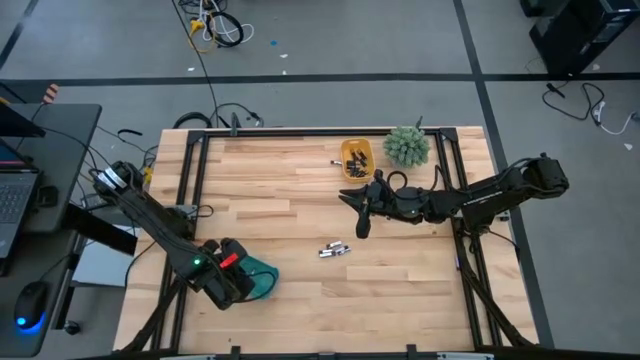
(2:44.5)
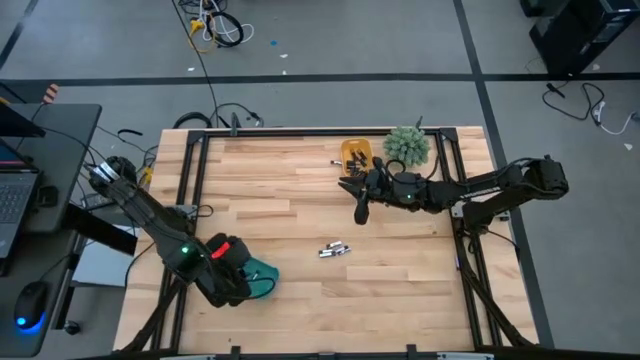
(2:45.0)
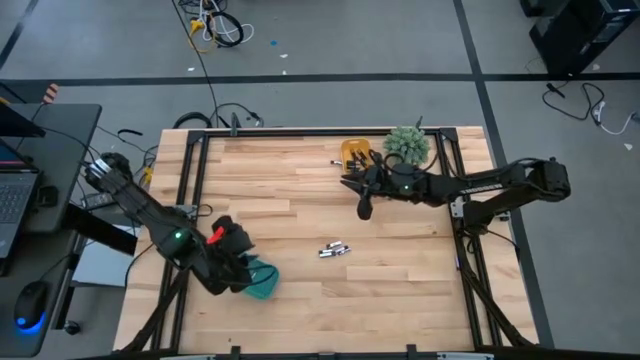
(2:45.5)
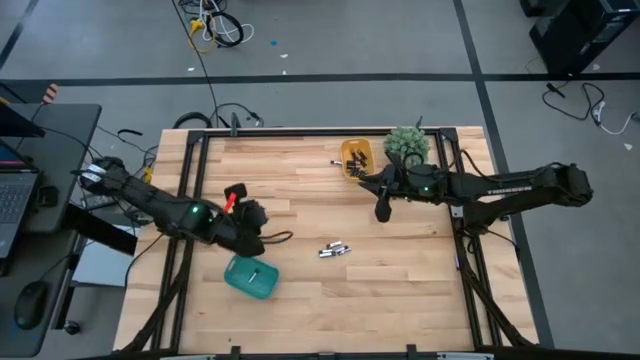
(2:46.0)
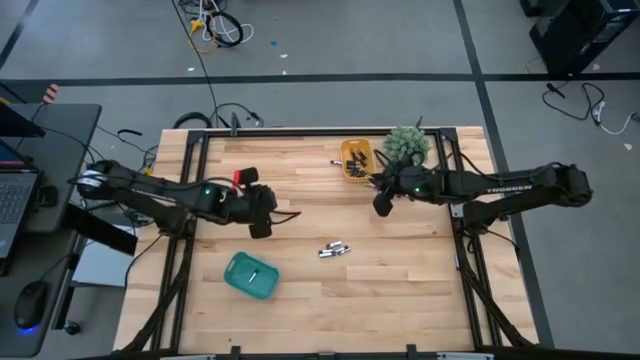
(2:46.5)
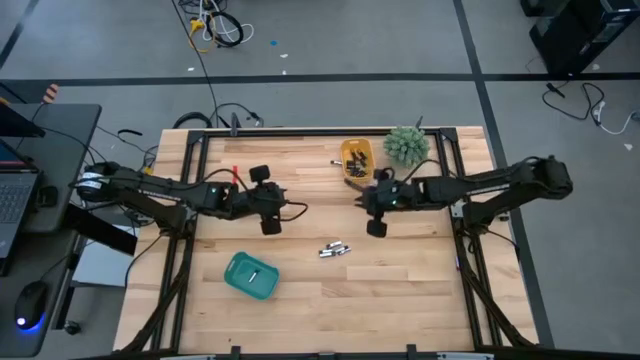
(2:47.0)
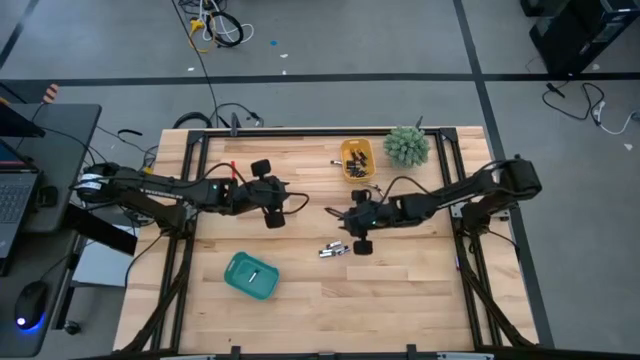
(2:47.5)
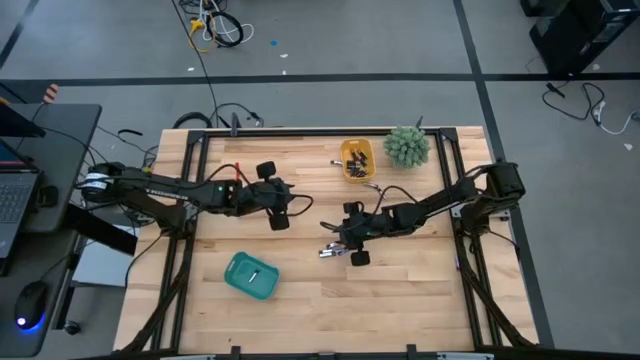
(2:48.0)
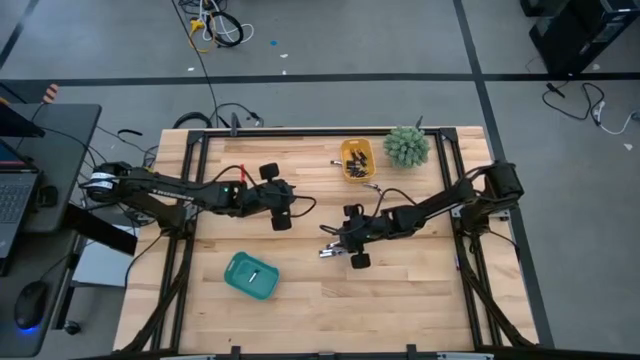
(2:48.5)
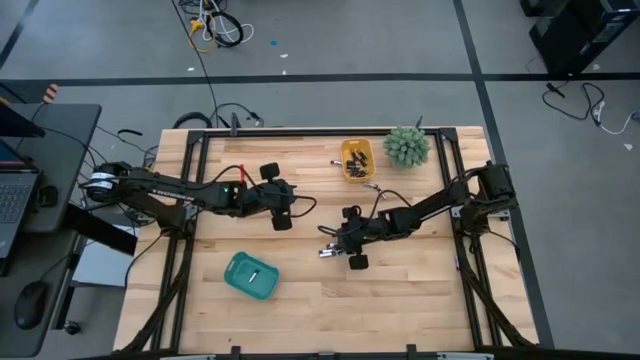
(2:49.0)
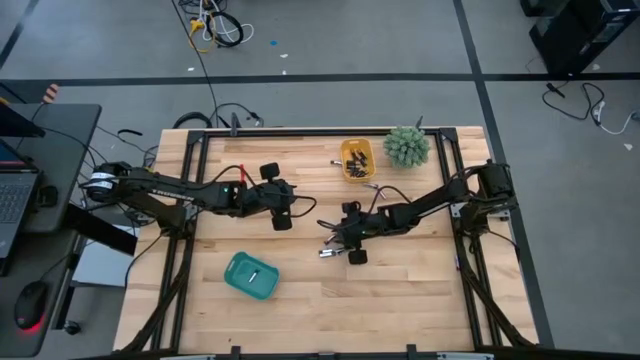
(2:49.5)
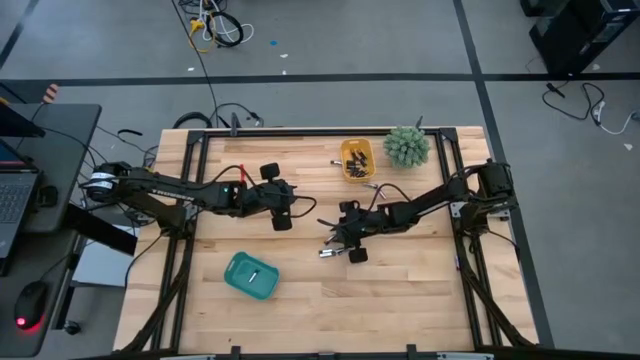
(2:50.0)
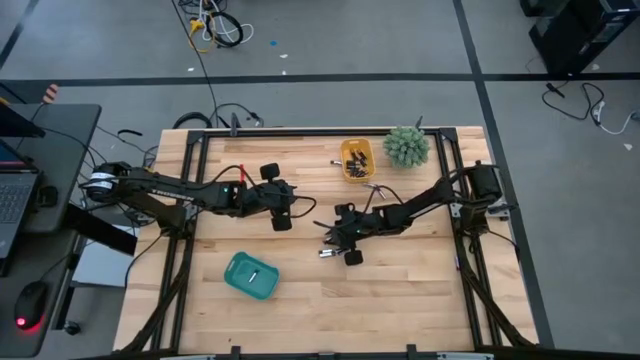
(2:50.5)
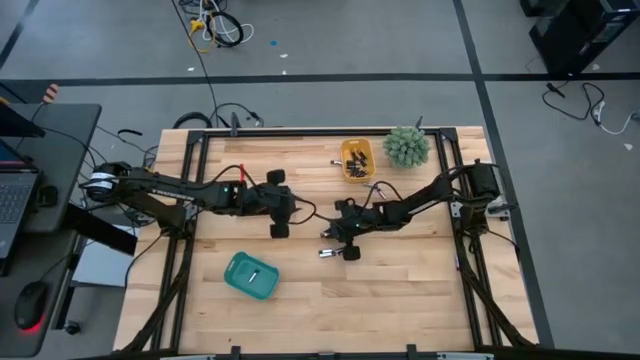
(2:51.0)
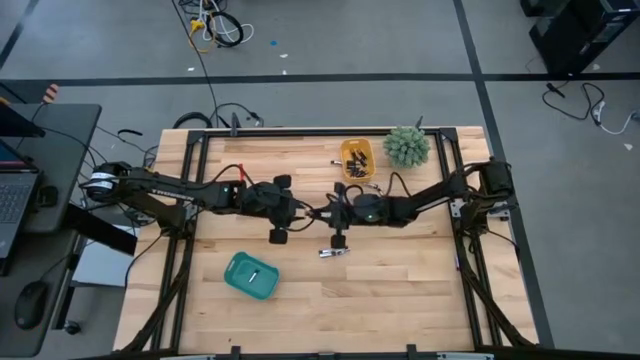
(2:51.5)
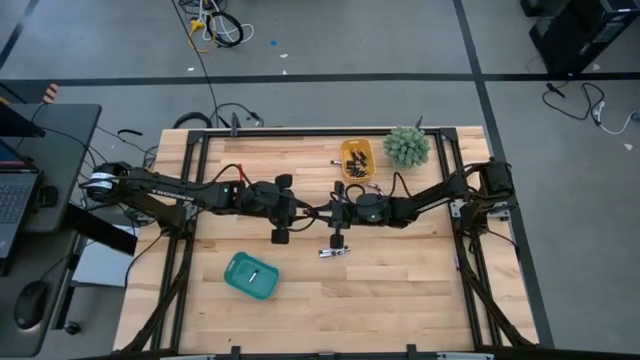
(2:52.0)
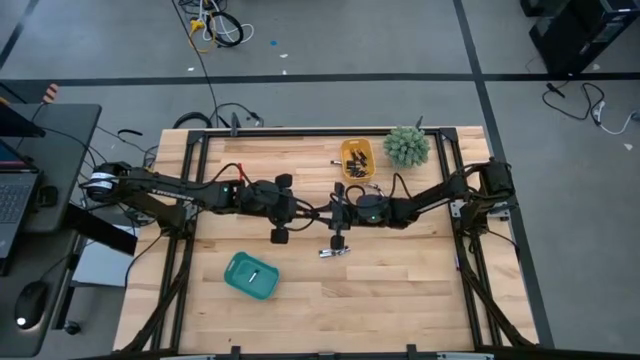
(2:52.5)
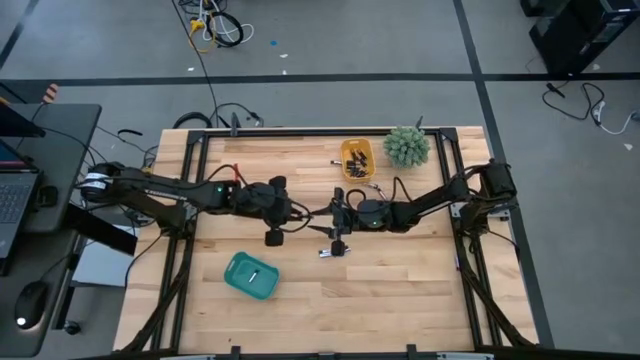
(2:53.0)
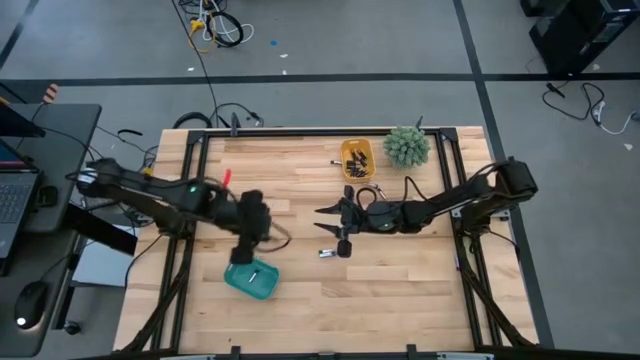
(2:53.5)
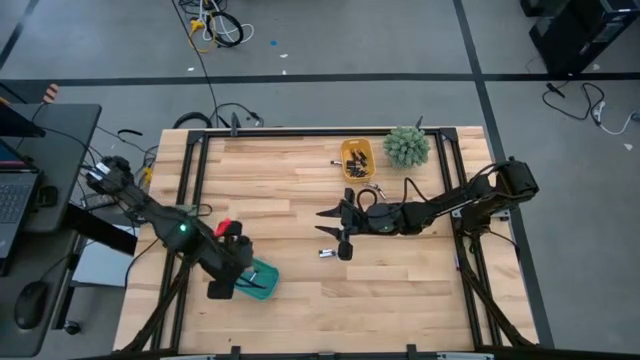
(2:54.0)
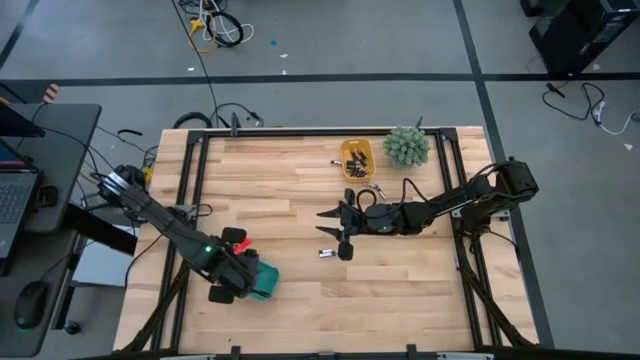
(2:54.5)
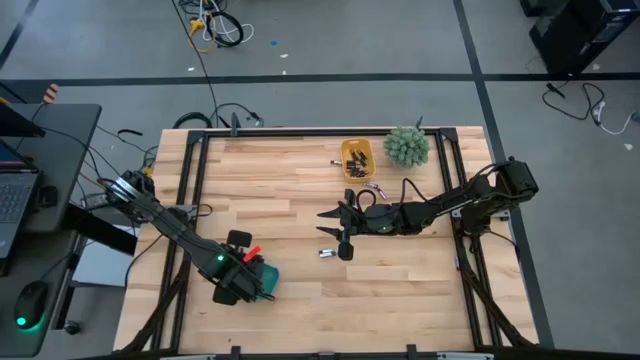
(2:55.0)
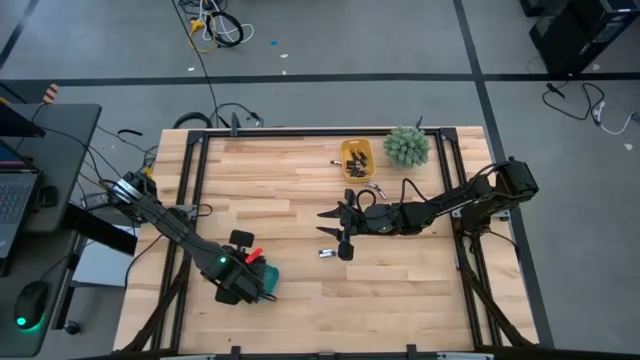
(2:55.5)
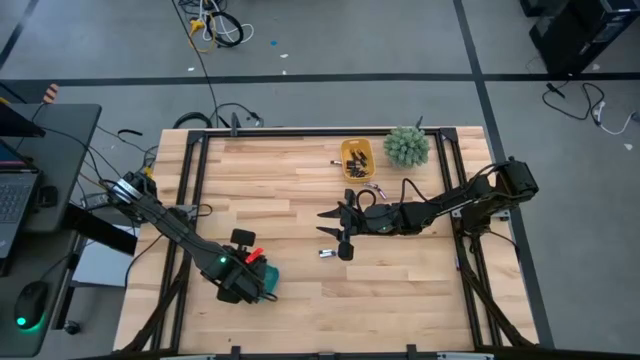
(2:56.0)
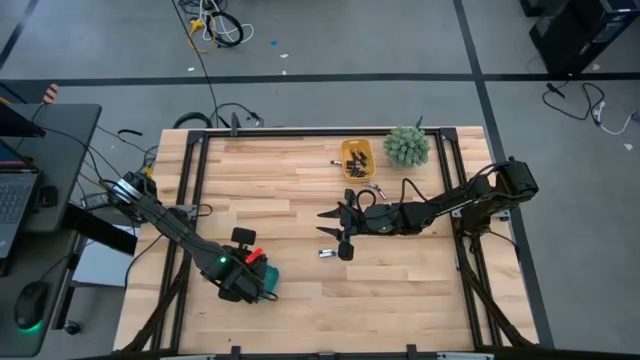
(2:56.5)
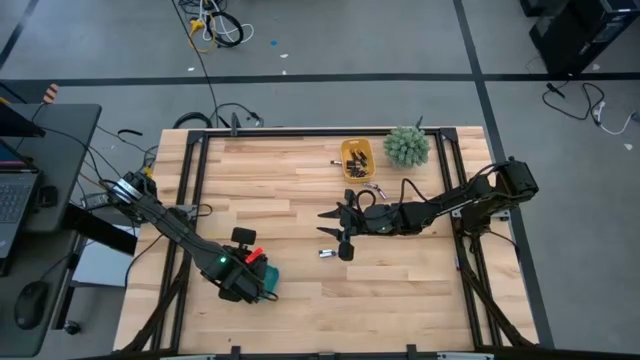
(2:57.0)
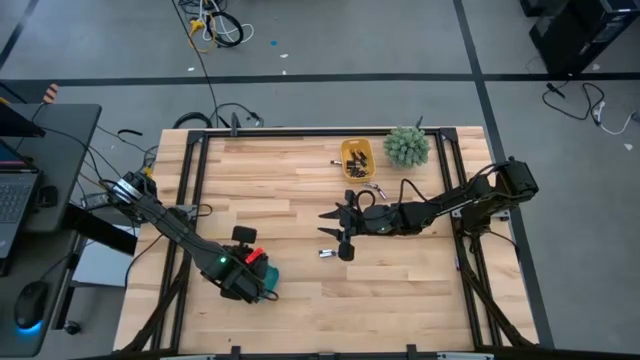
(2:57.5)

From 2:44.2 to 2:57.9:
Task: Sort batteries
Put the silver battery into the green bin

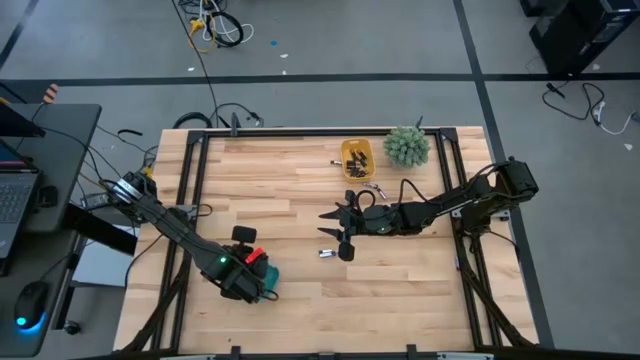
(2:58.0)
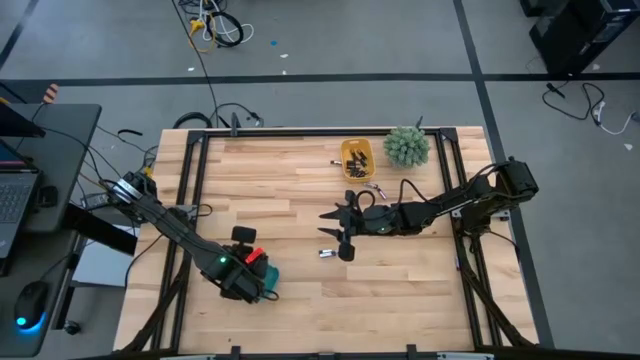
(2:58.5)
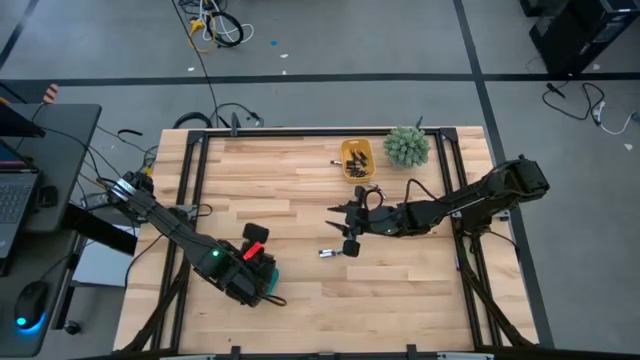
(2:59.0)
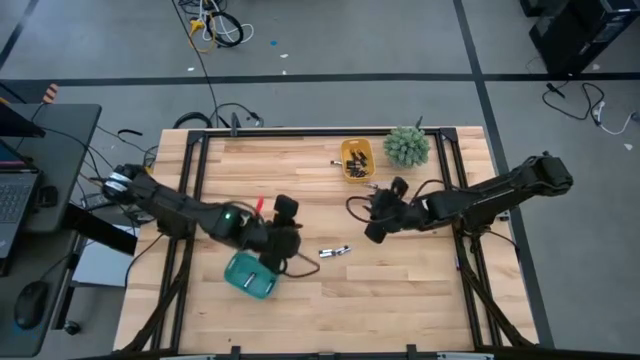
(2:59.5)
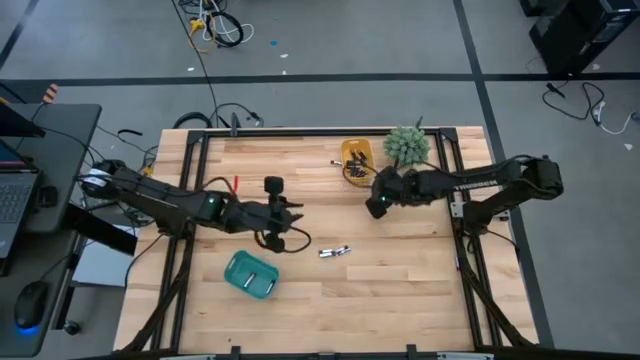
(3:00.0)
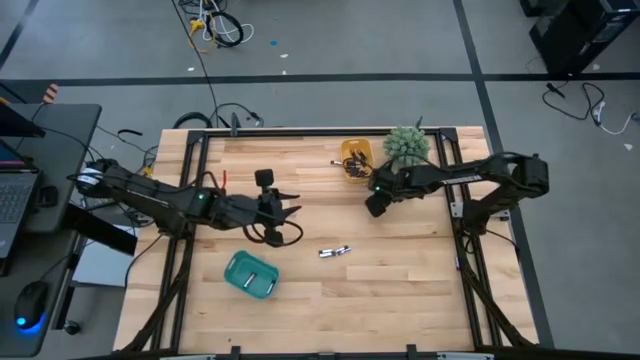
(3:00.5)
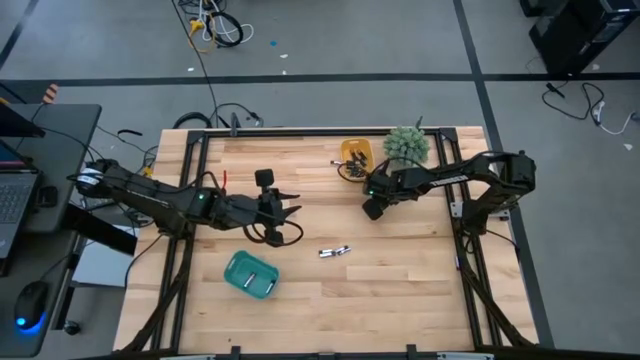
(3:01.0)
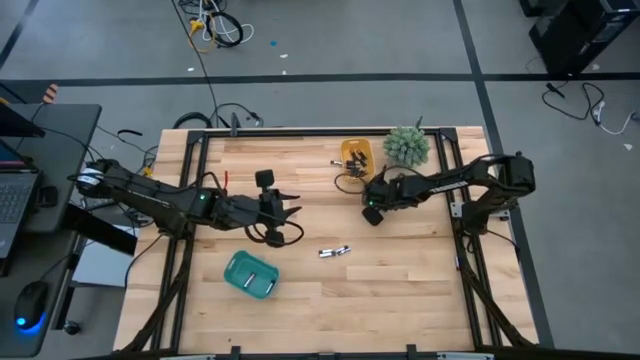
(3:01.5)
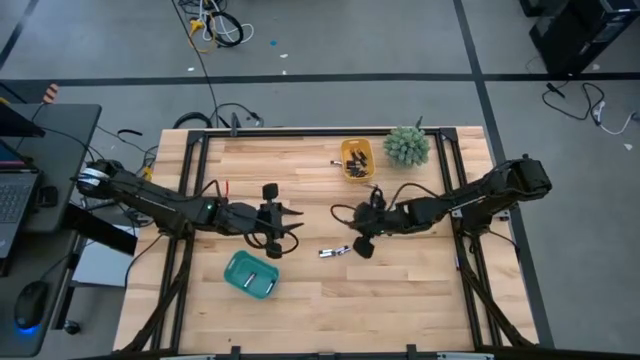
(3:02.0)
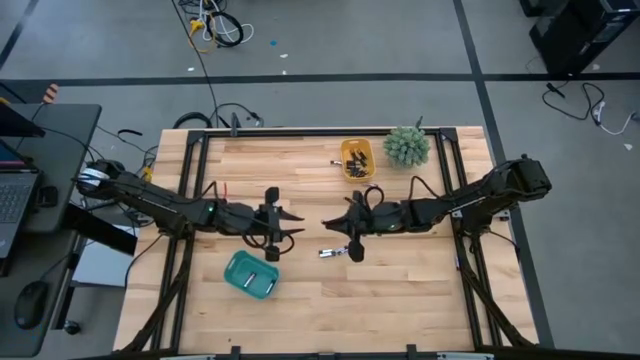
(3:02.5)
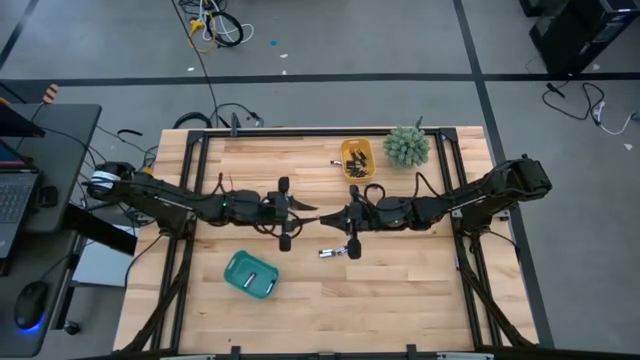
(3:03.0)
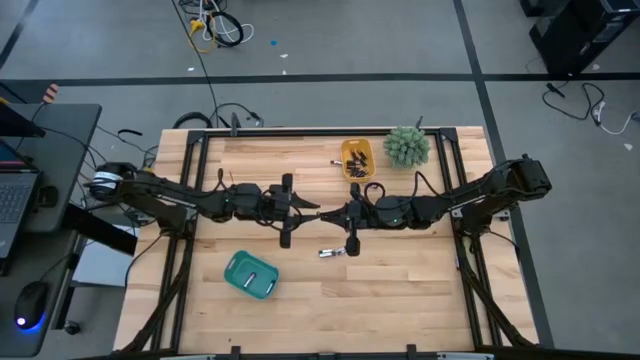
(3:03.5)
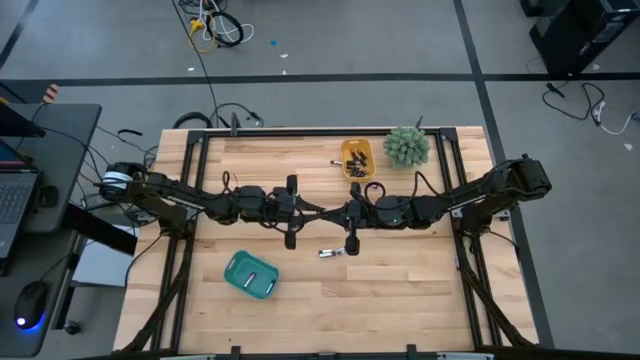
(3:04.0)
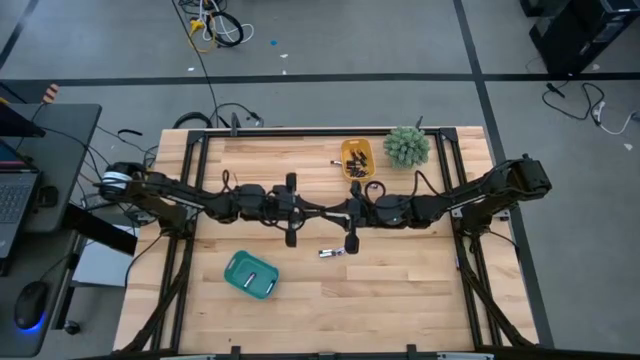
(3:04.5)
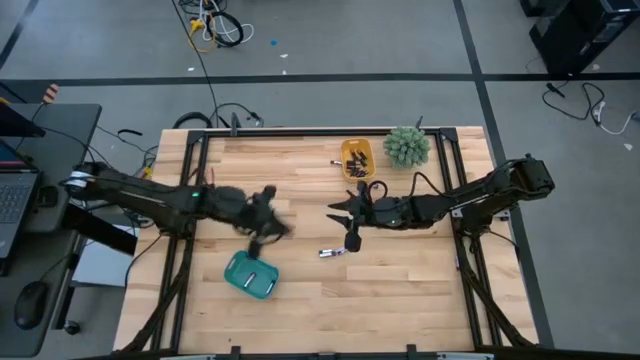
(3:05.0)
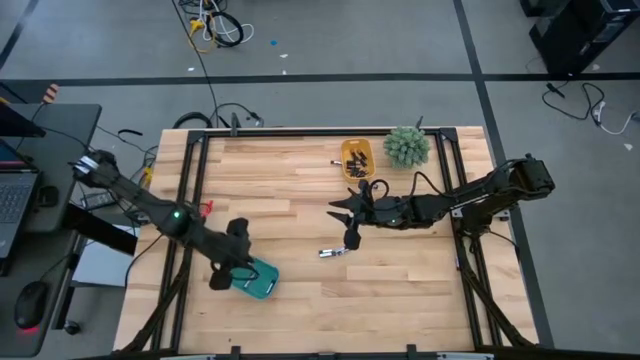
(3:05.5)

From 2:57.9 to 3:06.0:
Put the silver battery into the green bin

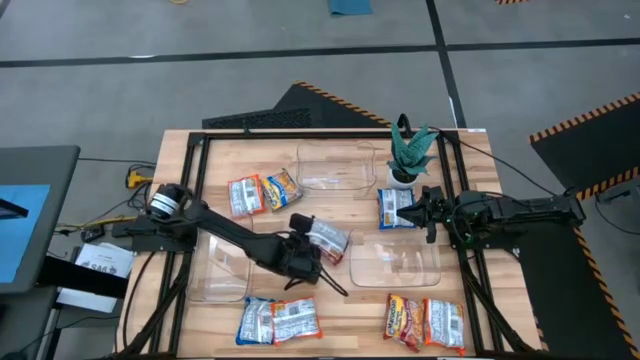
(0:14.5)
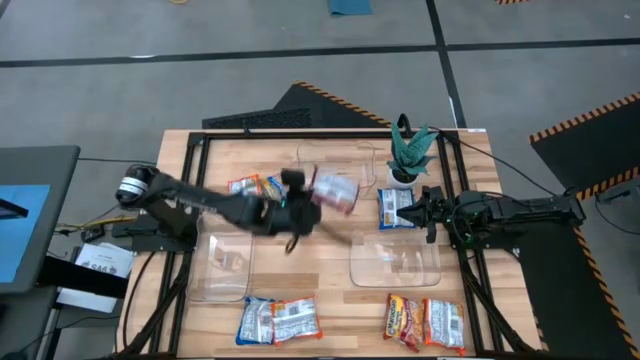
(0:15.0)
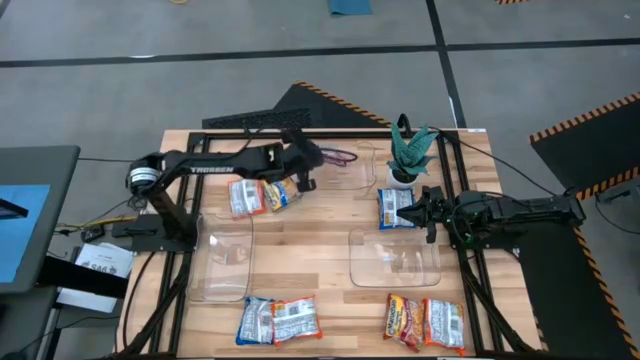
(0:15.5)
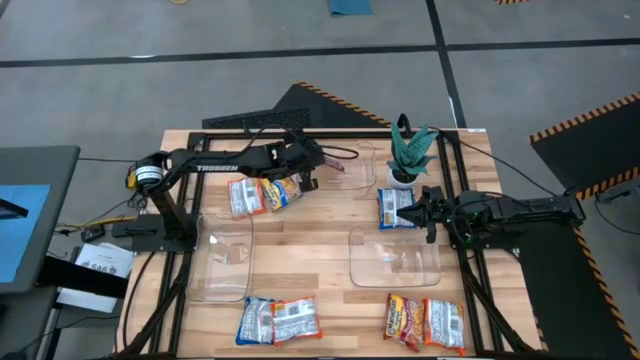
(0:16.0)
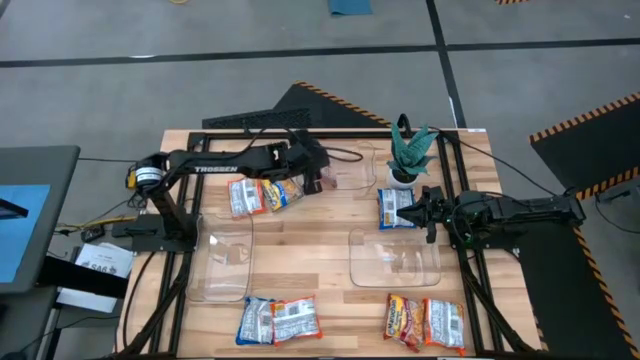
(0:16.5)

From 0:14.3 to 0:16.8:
Task: Sort Maruchan noodles
Put the top left red bag into the top transparent bin
